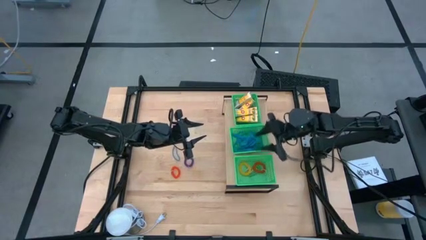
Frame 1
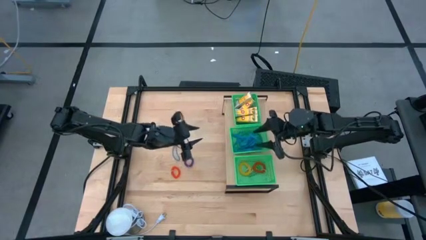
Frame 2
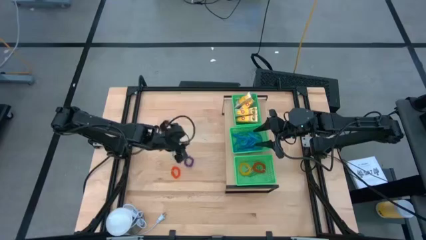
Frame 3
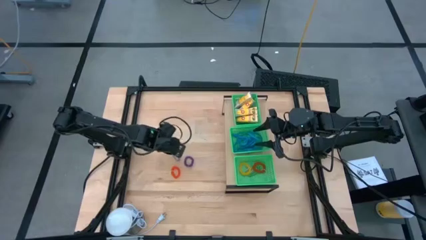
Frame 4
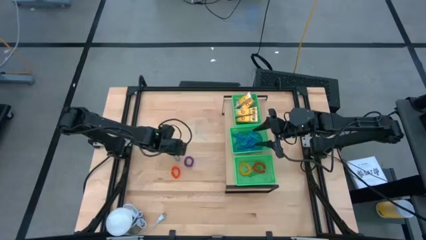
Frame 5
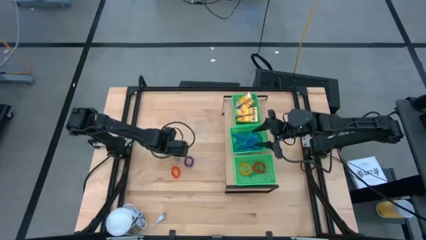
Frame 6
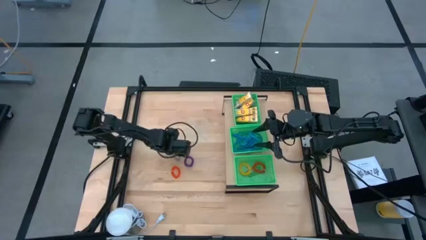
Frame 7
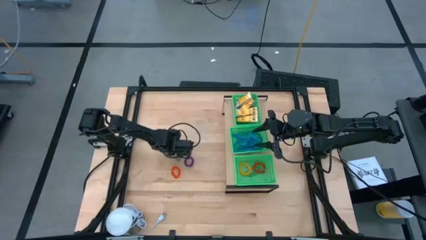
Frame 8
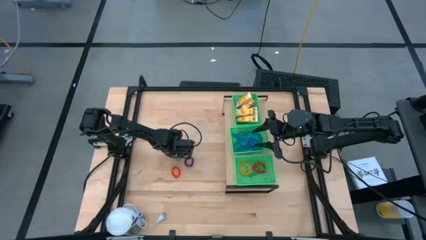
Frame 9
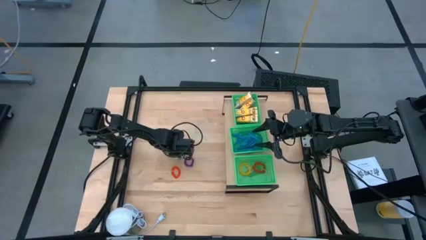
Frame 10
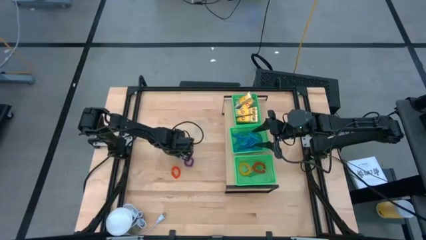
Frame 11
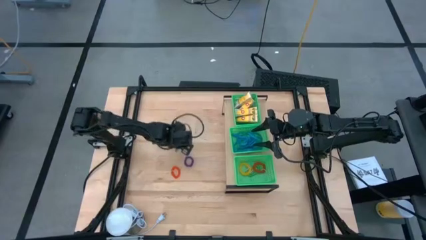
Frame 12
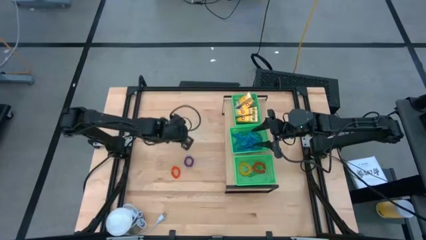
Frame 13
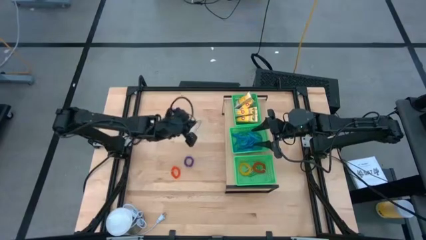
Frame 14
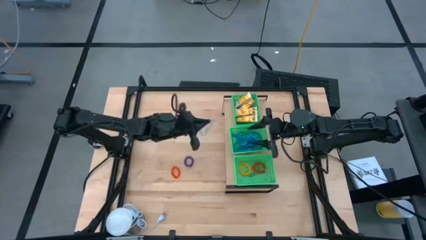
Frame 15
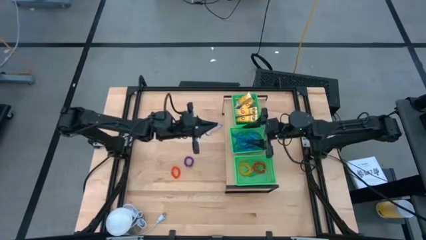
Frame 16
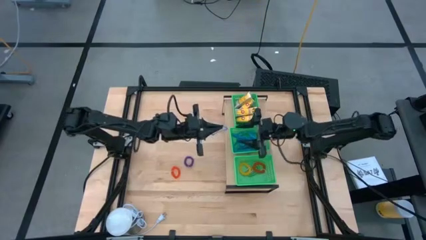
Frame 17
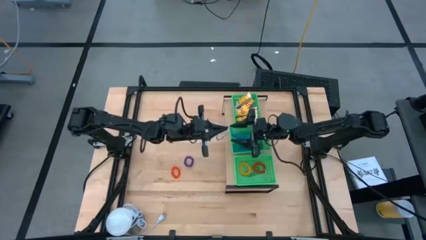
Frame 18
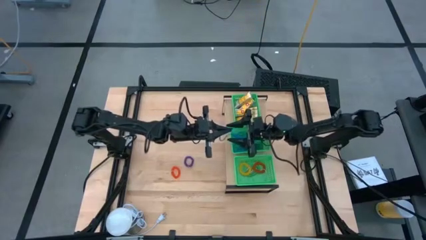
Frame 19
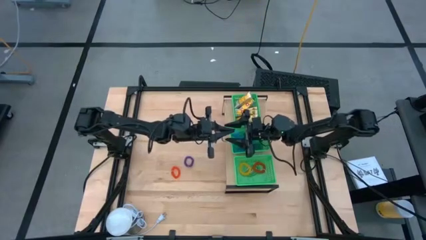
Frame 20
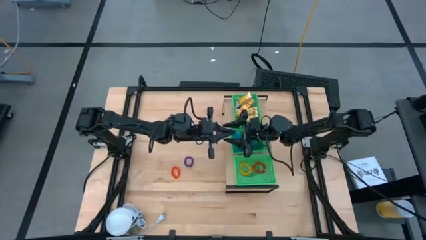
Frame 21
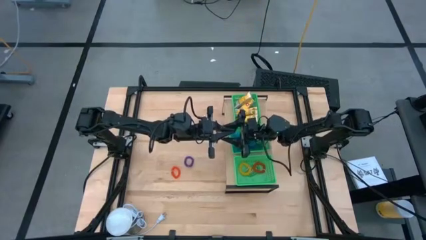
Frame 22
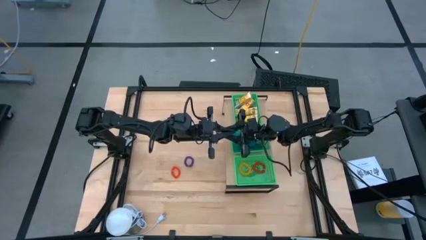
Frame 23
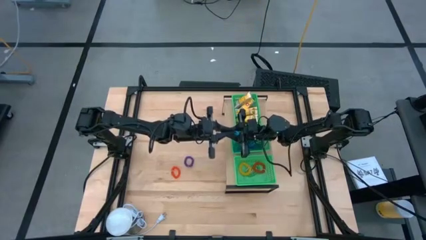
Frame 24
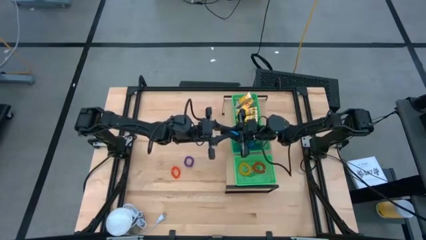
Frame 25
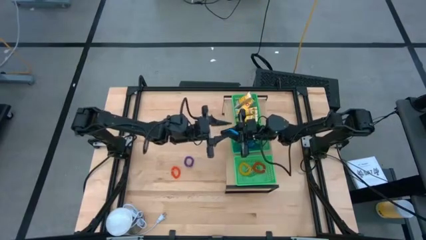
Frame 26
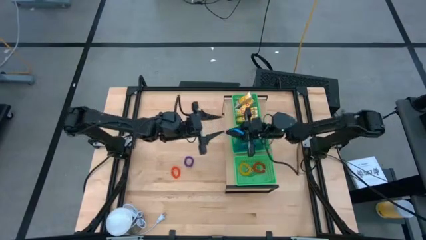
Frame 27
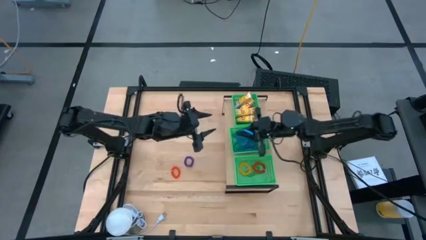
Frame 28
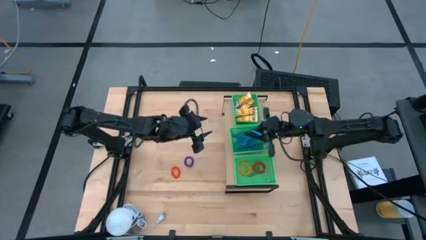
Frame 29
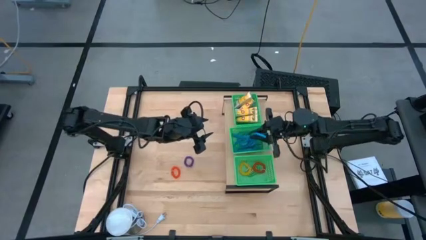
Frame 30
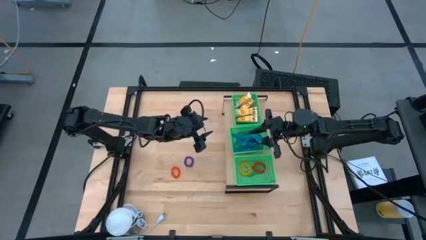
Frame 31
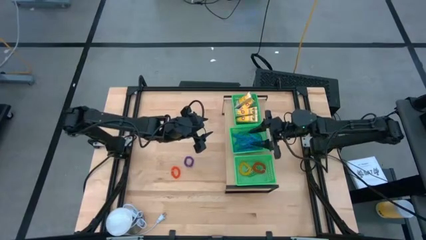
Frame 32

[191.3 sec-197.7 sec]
Task: Pick & Place Office Desk Supplies
Put the blue rubber band into the middle green bin

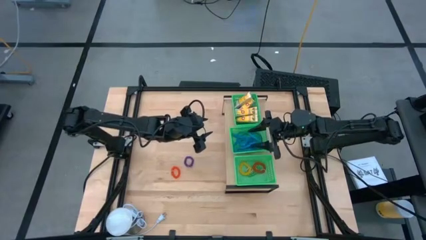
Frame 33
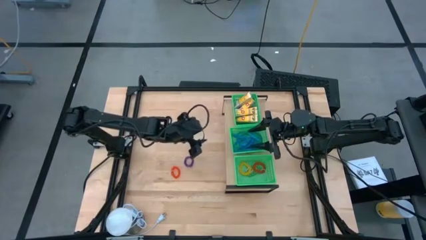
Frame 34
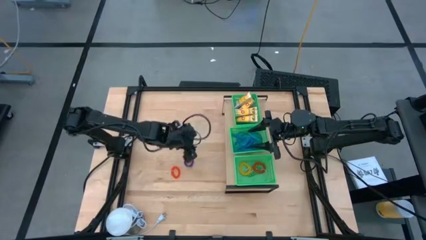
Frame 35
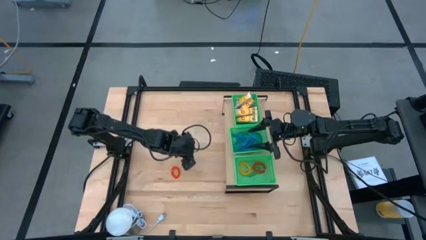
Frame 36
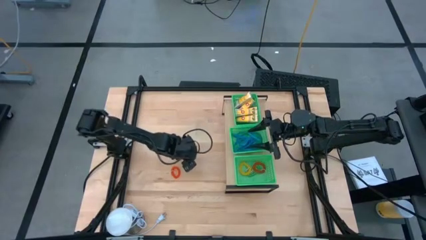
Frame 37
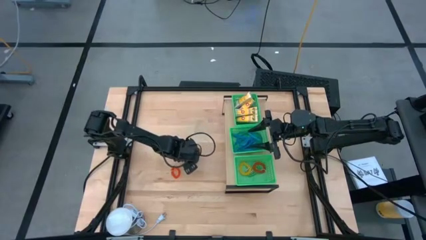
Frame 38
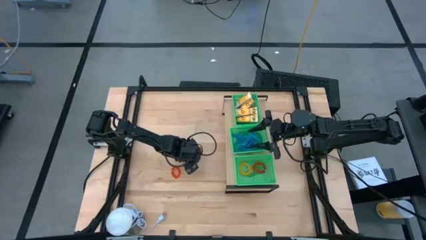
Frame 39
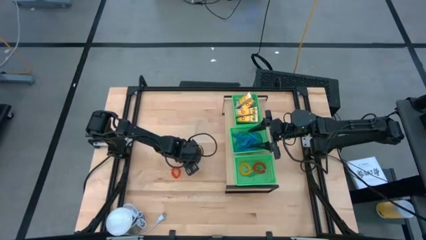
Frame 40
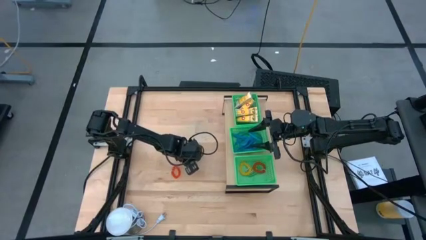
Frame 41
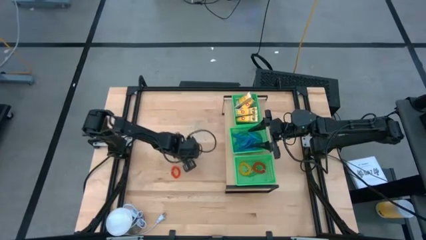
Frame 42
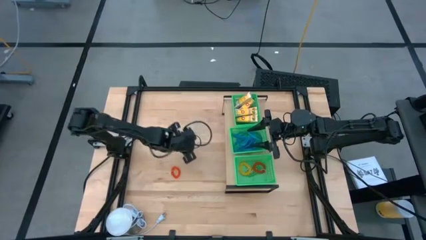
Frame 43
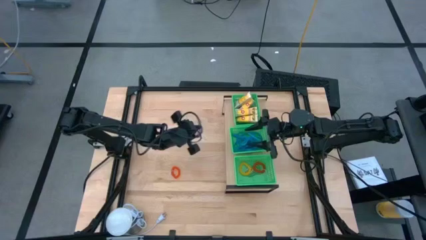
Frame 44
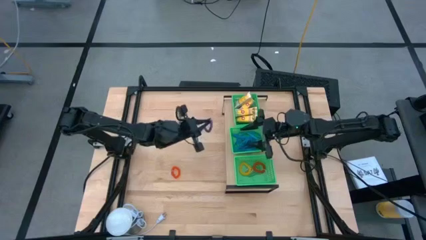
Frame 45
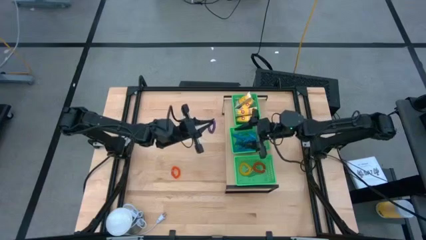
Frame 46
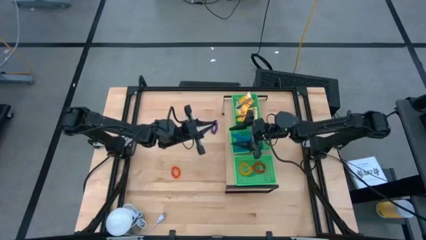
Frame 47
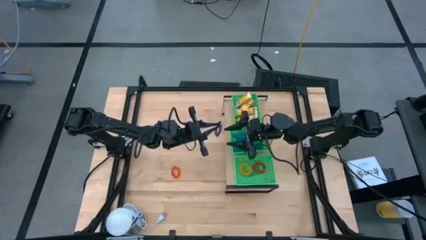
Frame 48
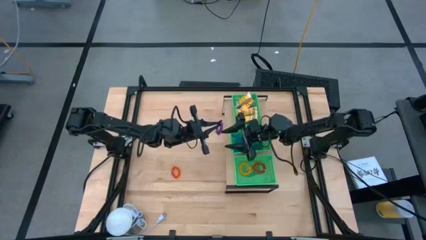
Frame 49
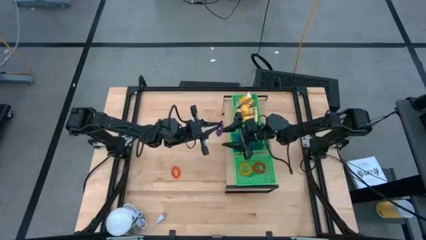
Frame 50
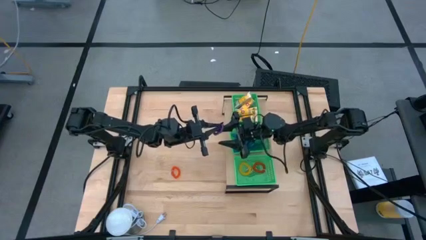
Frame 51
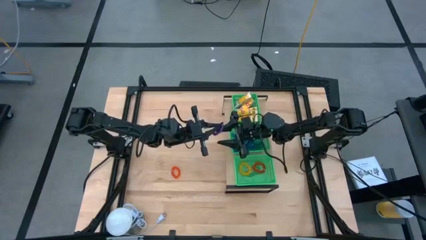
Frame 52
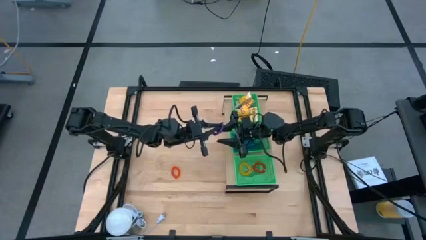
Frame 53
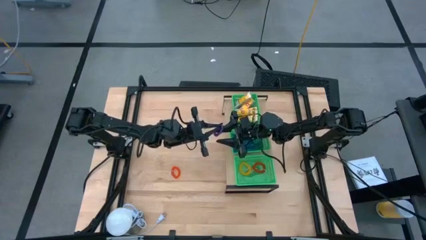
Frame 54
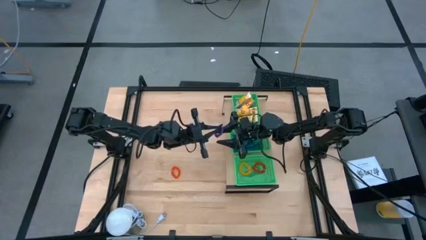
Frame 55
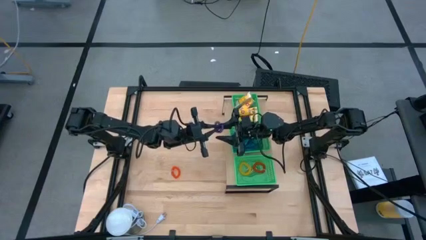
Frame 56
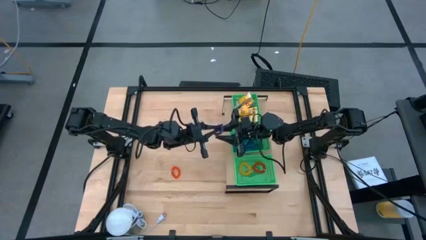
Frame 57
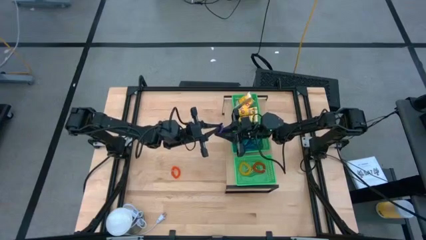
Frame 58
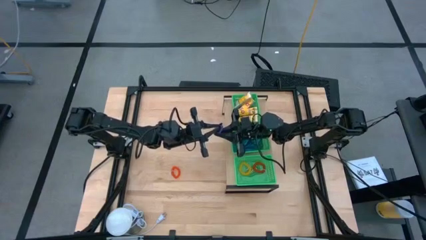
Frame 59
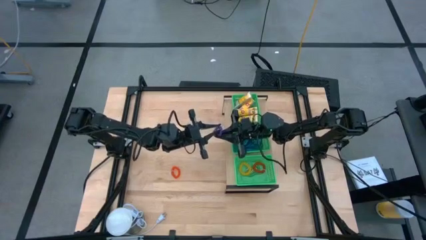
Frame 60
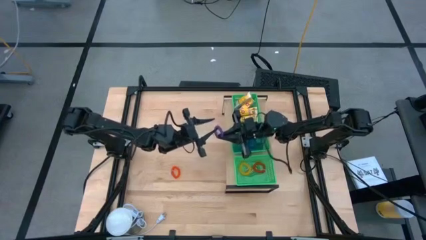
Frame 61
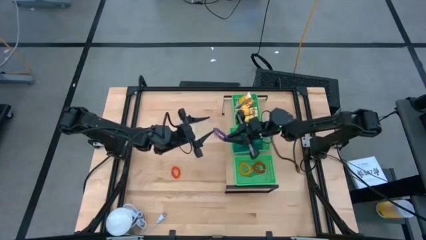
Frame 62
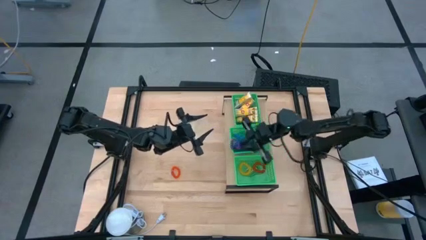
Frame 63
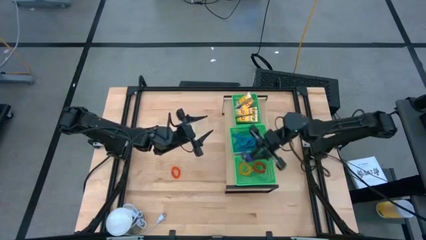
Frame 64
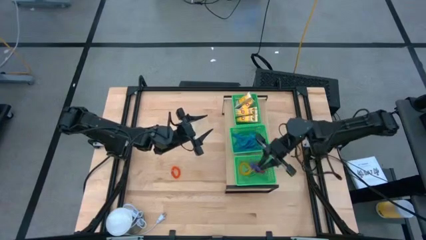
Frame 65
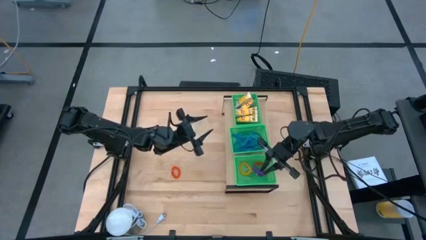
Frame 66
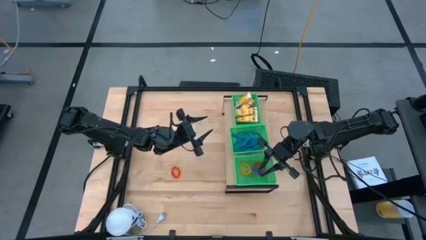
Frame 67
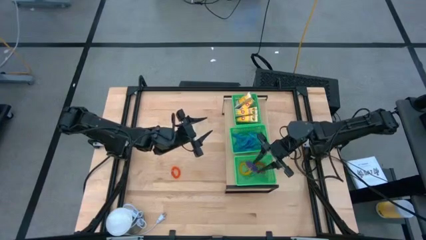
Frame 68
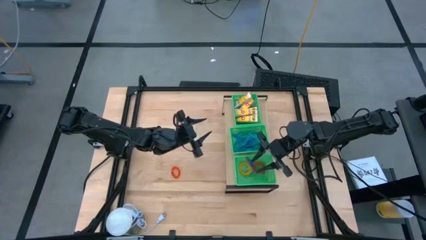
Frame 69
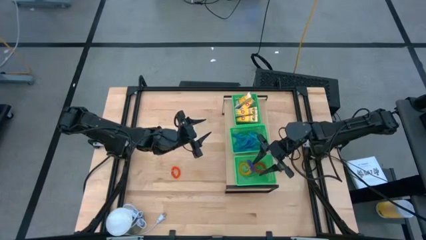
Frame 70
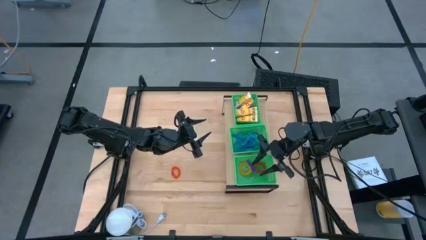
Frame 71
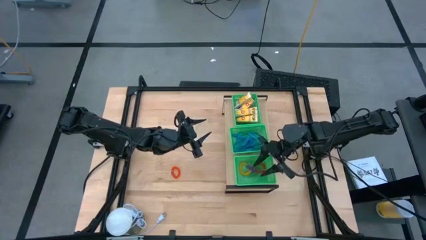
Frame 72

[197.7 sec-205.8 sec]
Put the violet spring keychain into the bottom green bin

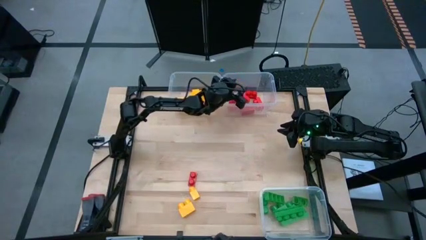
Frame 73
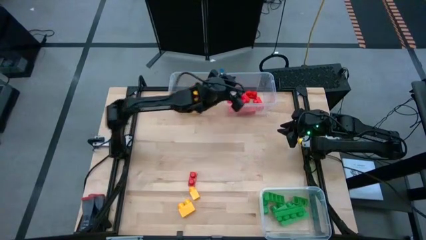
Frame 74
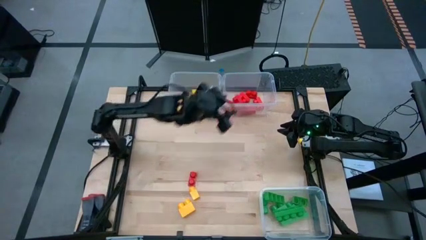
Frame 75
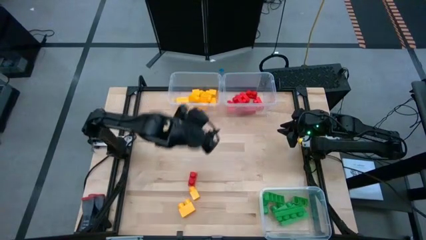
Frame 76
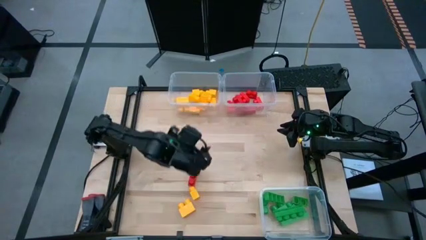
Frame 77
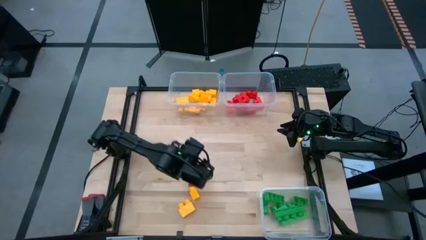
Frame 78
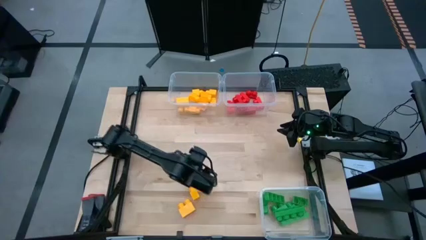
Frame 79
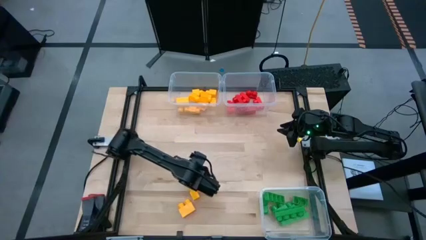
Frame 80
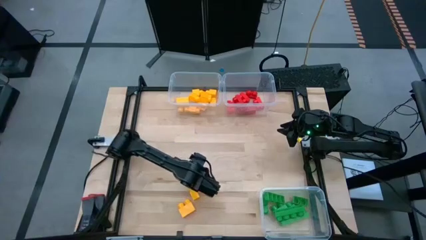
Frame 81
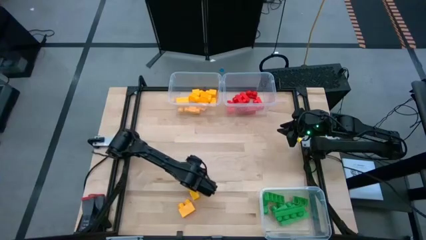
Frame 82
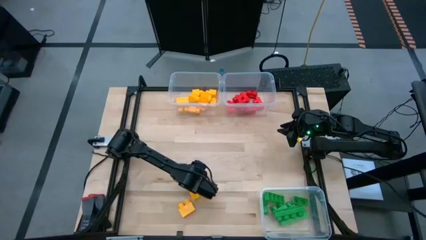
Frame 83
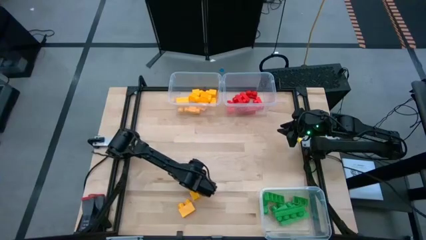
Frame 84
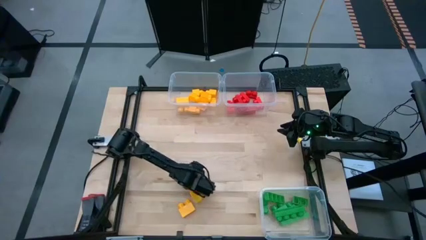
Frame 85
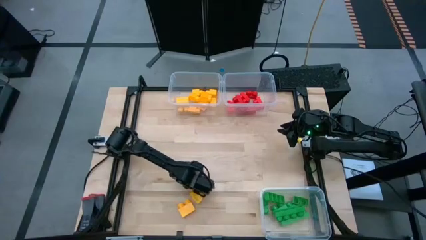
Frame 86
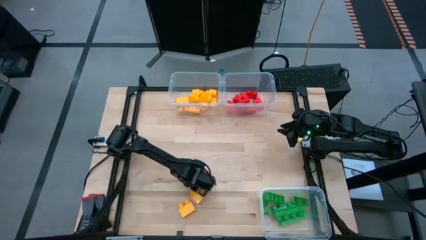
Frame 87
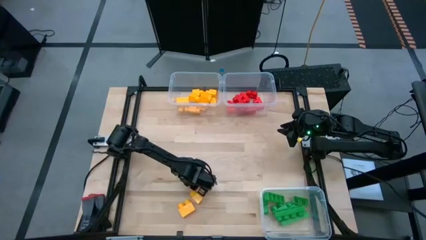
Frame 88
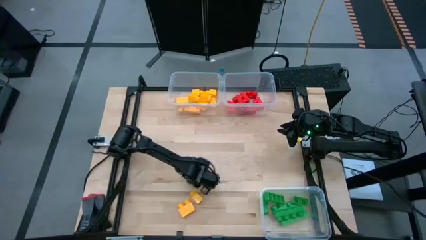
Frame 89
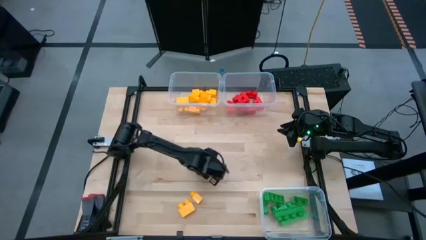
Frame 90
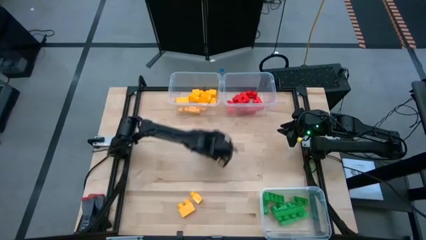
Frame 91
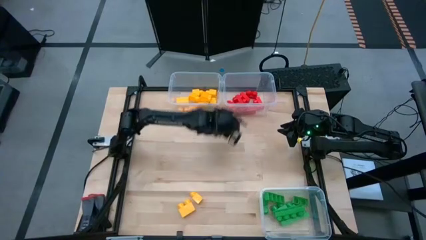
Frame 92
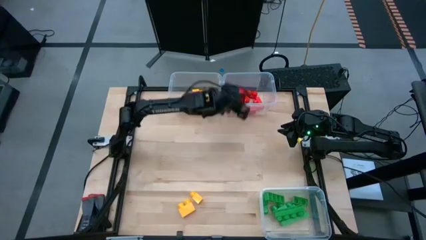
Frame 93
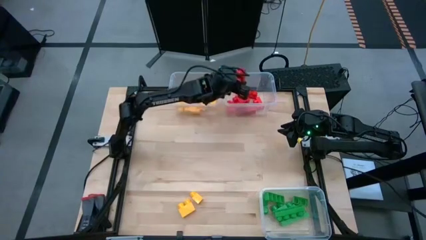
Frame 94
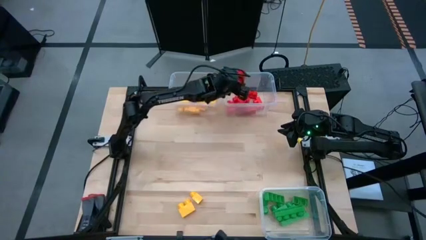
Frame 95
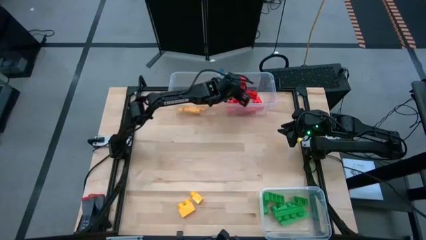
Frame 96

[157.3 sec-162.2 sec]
Task: Sort blocks
Put the red game piece into the right transparent bin
